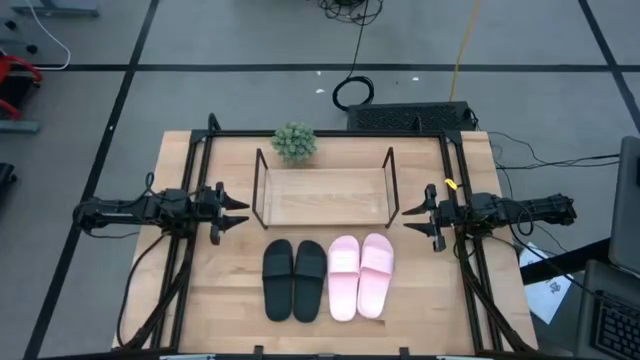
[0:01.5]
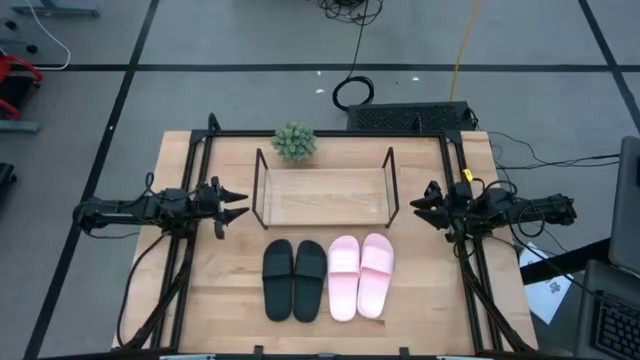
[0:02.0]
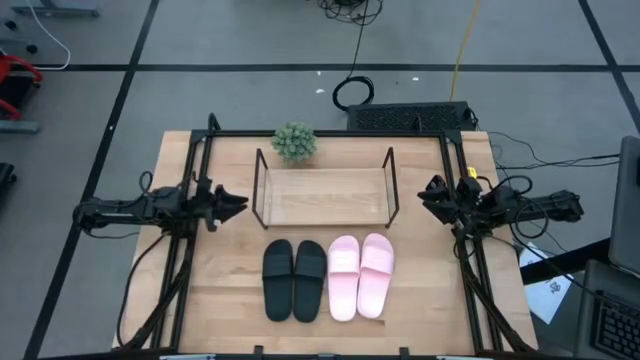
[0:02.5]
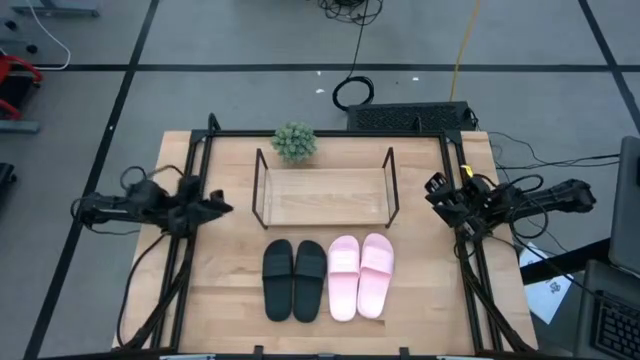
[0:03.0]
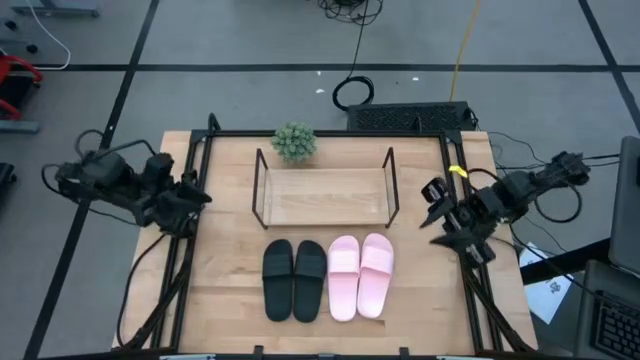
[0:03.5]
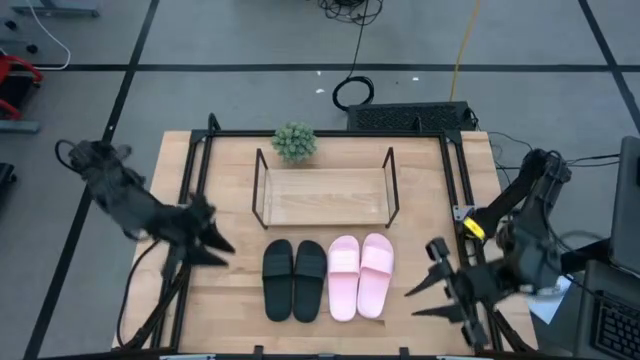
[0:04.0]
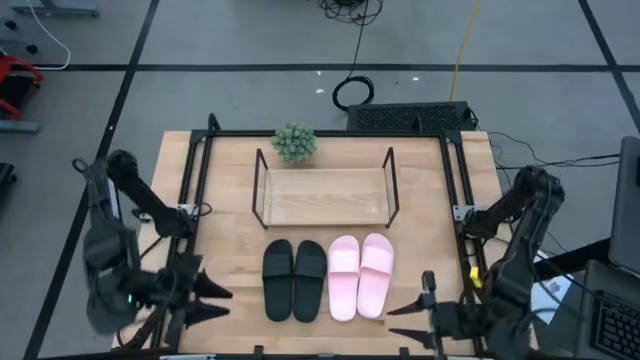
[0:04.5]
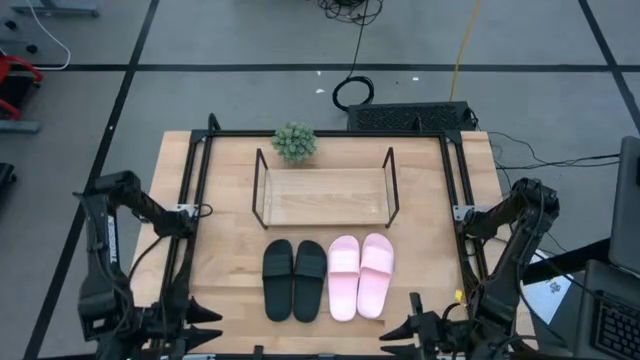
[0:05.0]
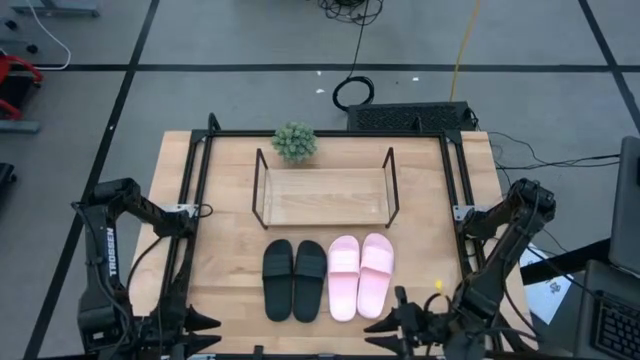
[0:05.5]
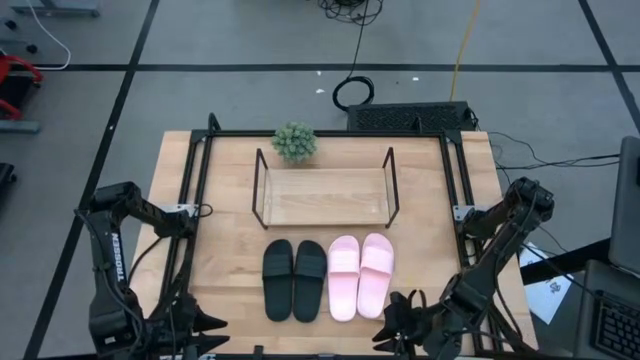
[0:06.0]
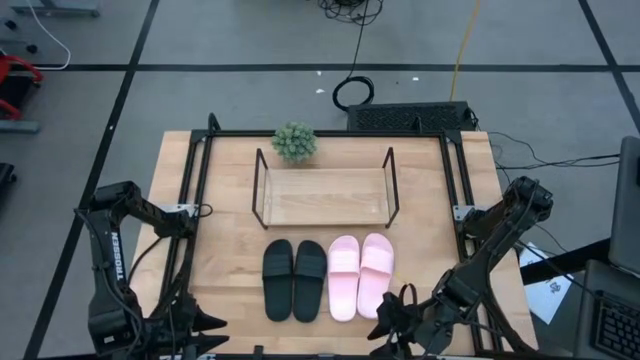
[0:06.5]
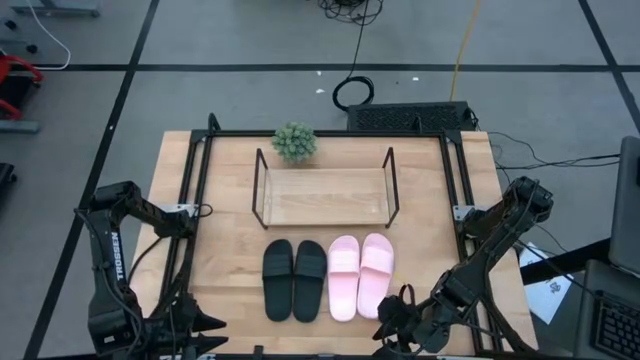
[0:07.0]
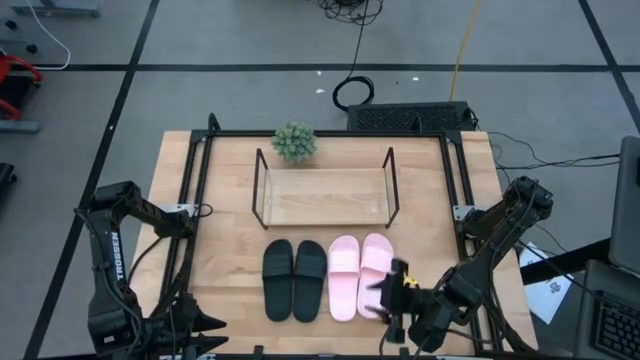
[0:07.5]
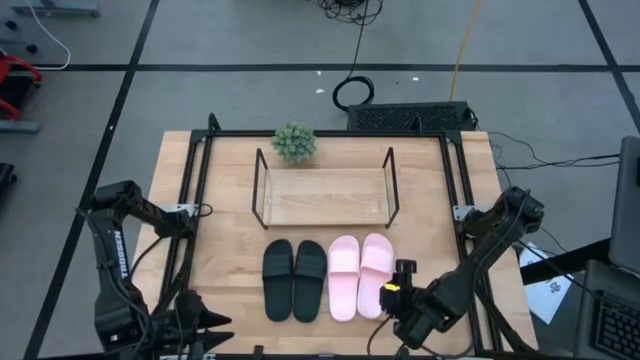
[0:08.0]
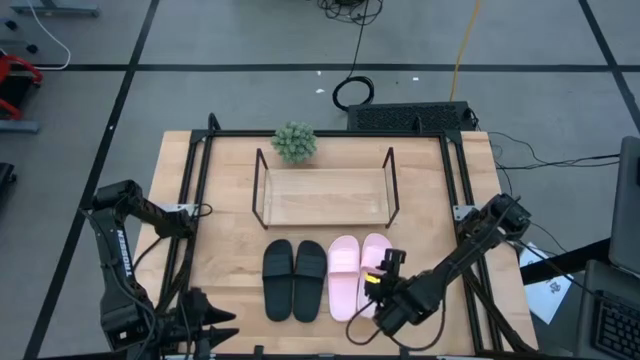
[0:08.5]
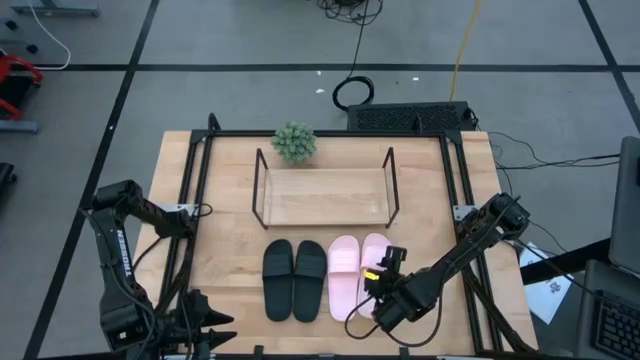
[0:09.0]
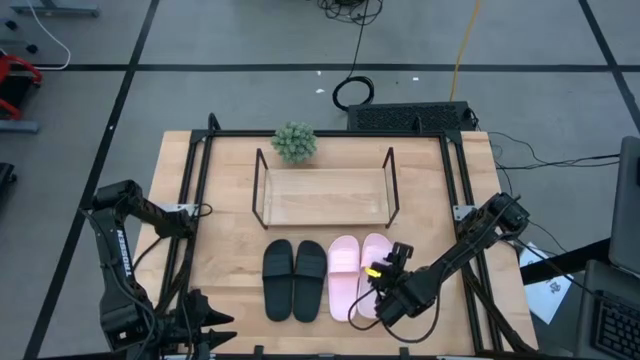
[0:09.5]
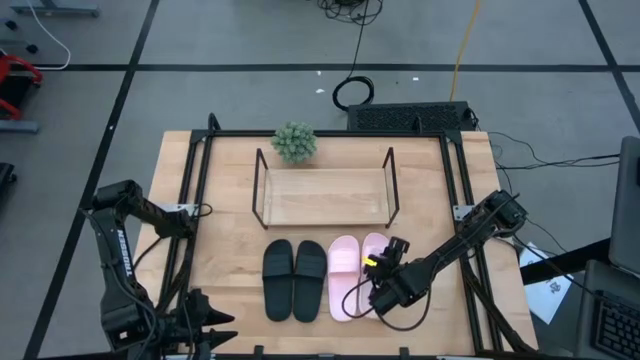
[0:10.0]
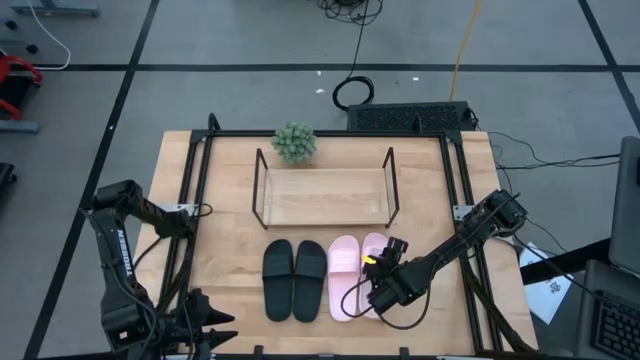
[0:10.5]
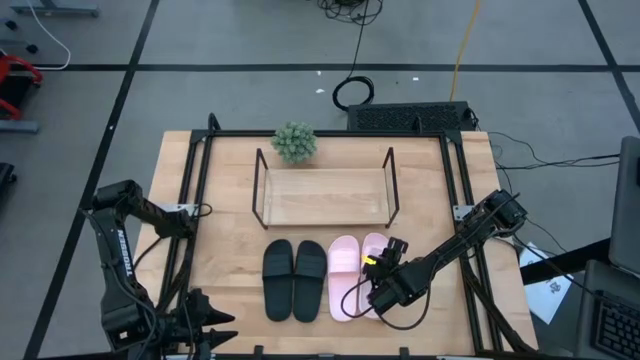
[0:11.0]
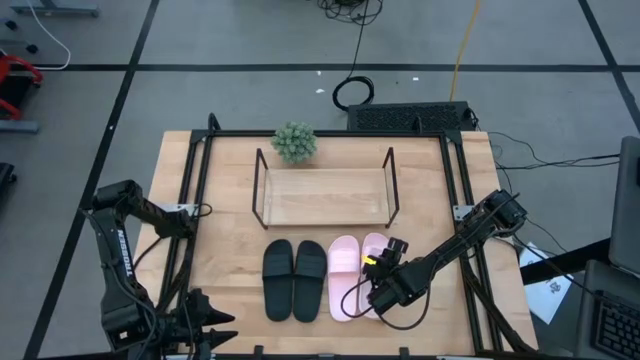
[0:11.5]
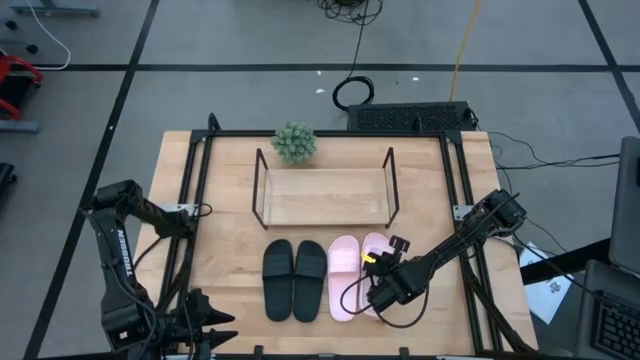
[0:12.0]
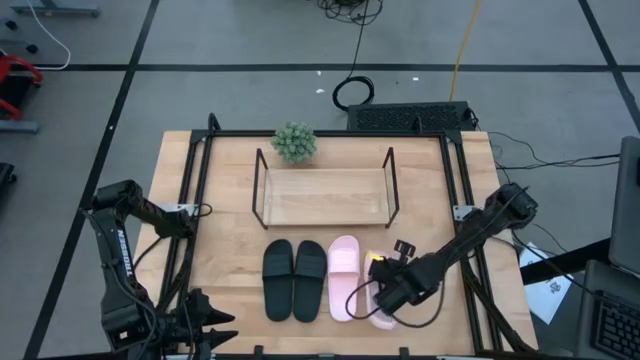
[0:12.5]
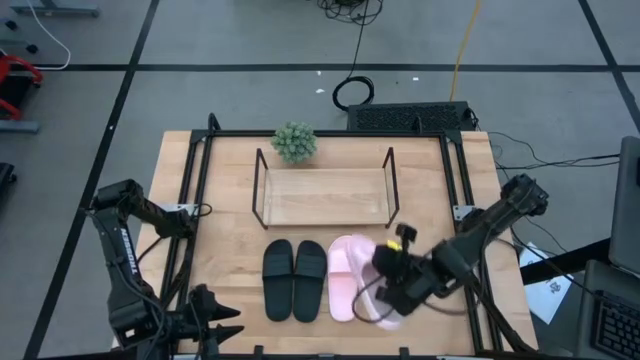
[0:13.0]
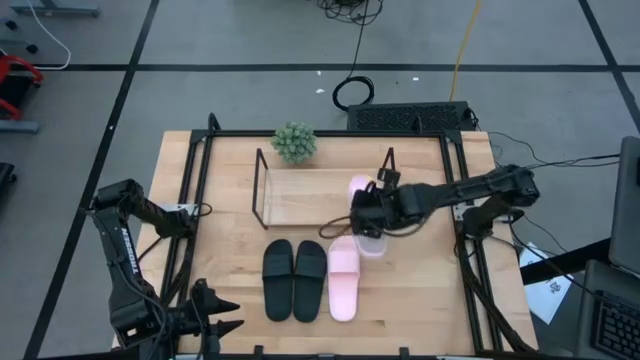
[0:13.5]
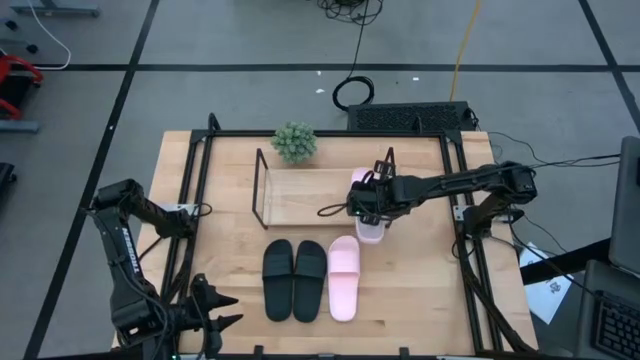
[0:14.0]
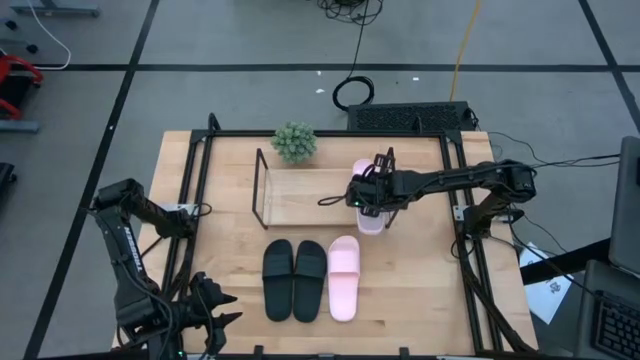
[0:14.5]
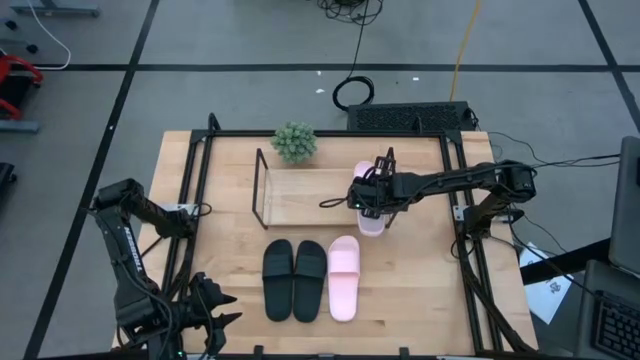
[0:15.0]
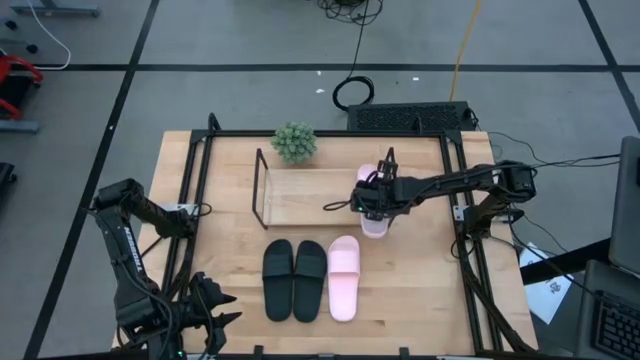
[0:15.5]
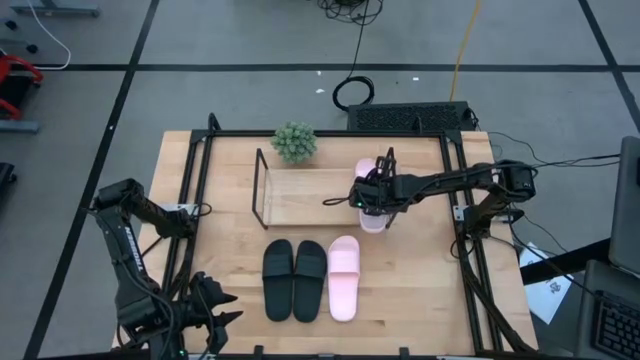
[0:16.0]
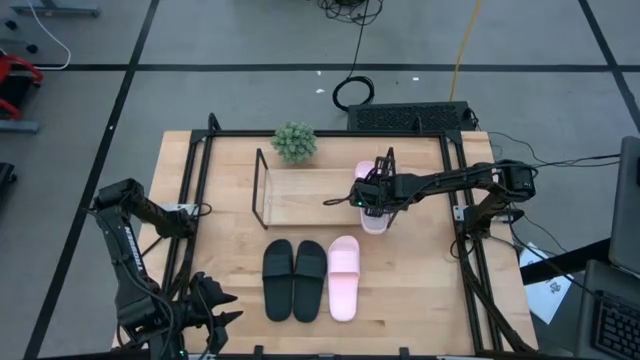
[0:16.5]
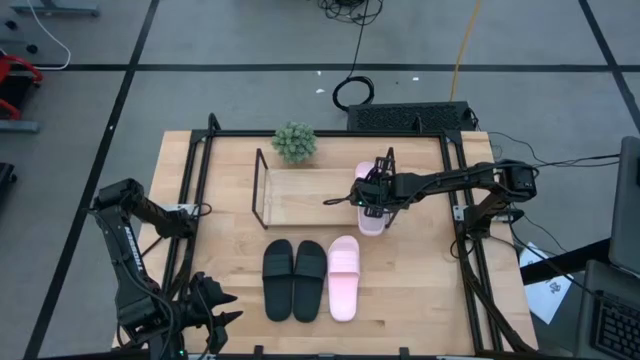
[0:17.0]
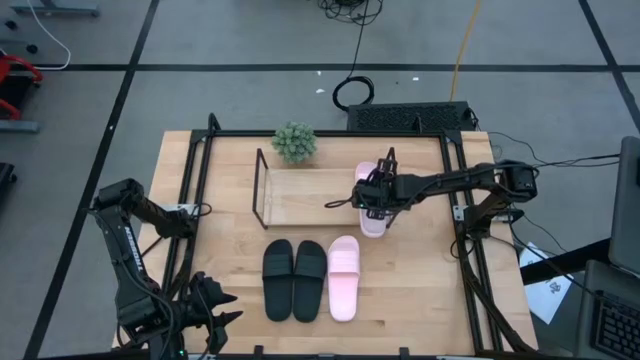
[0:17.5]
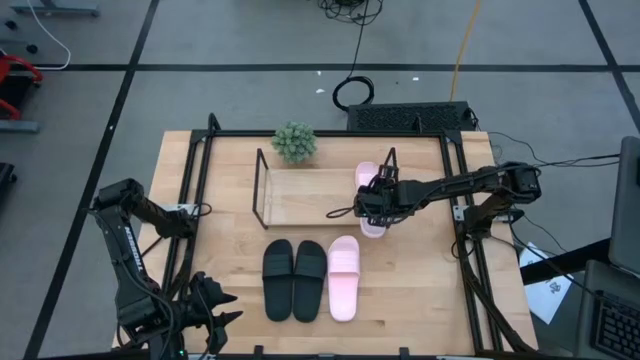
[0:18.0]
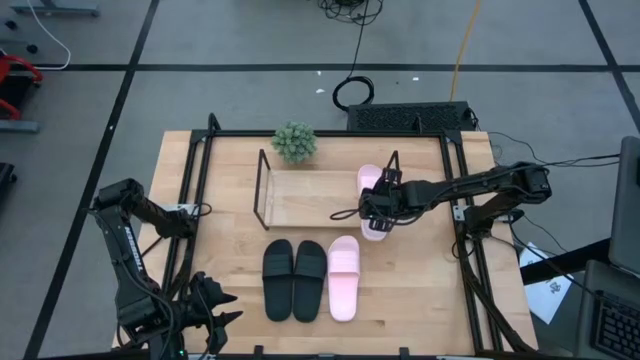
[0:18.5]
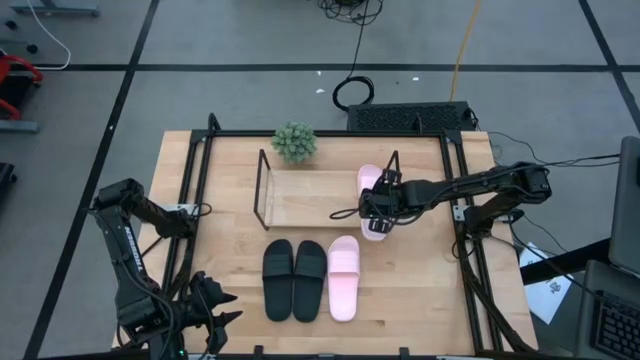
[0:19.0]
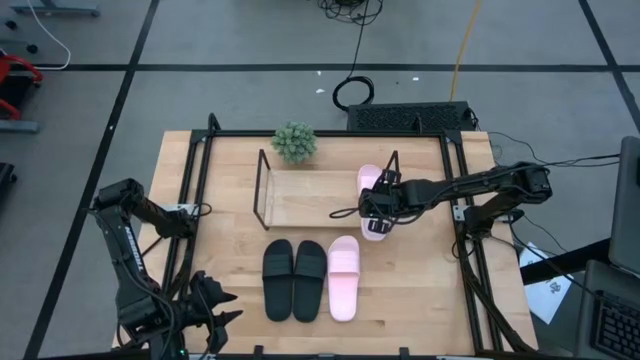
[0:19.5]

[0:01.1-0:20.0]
Task: Pick and place slides into the shelf
Put the right pink slide on the shelf
